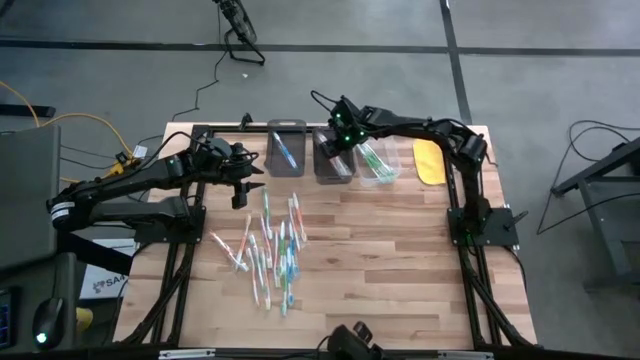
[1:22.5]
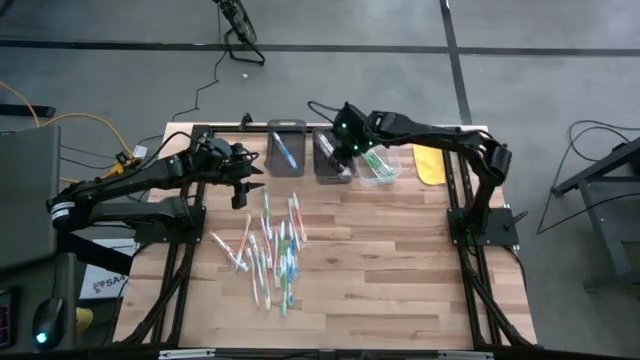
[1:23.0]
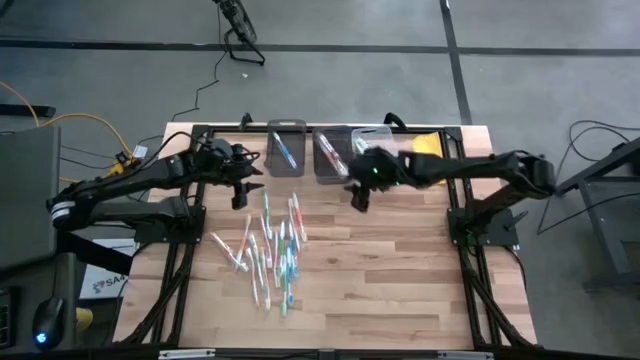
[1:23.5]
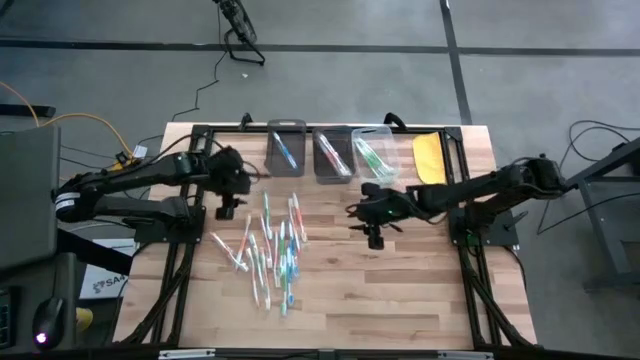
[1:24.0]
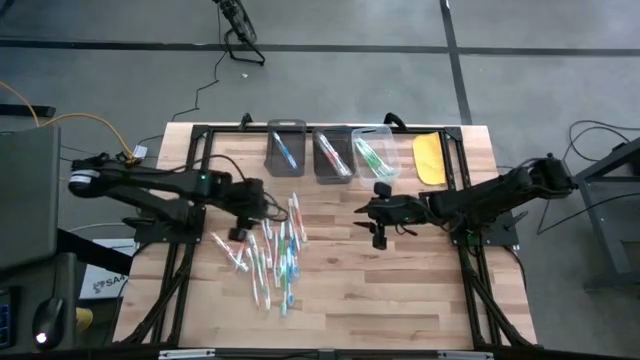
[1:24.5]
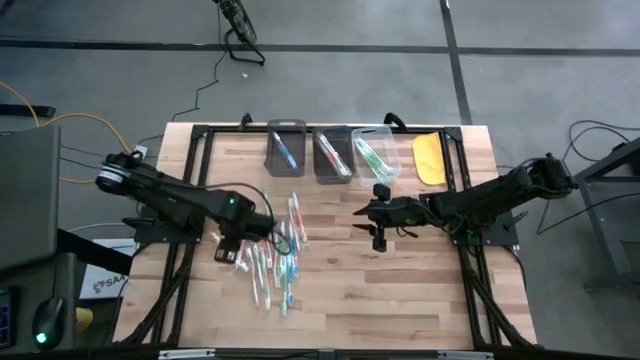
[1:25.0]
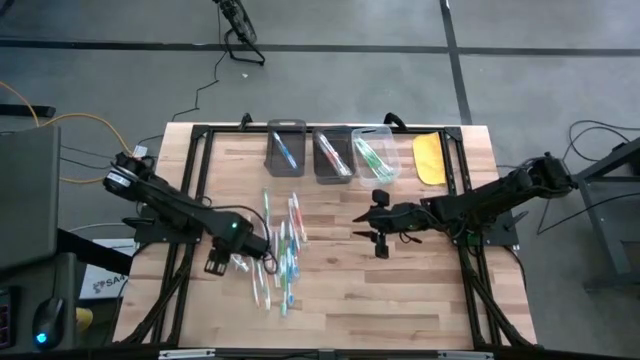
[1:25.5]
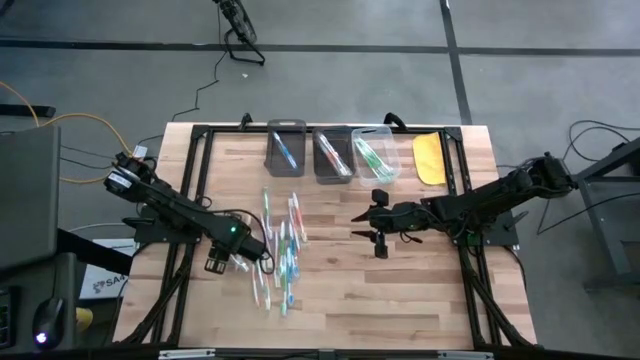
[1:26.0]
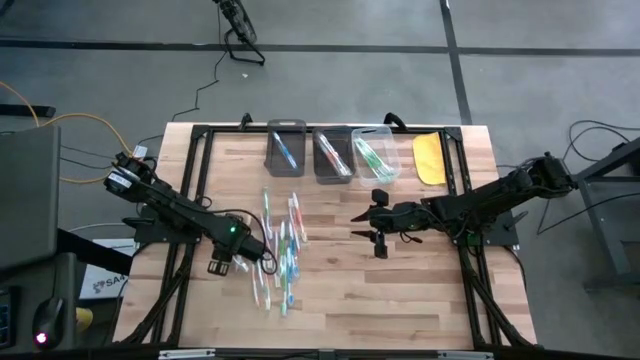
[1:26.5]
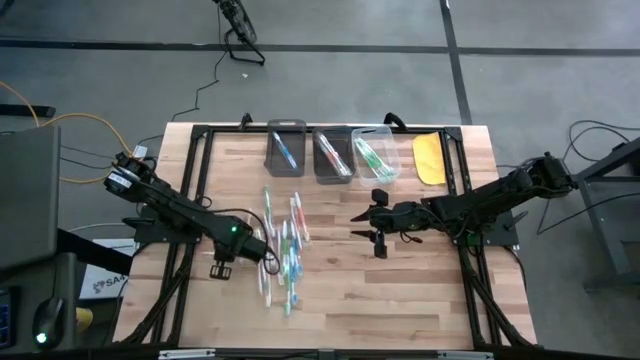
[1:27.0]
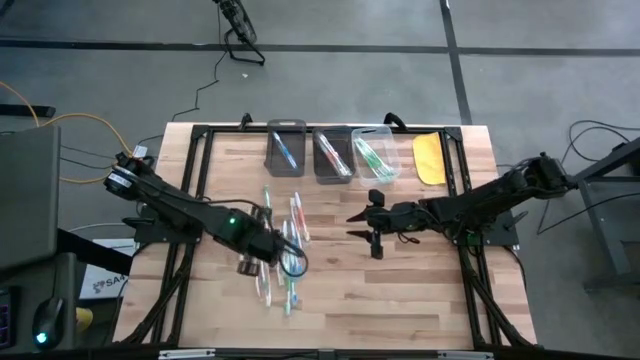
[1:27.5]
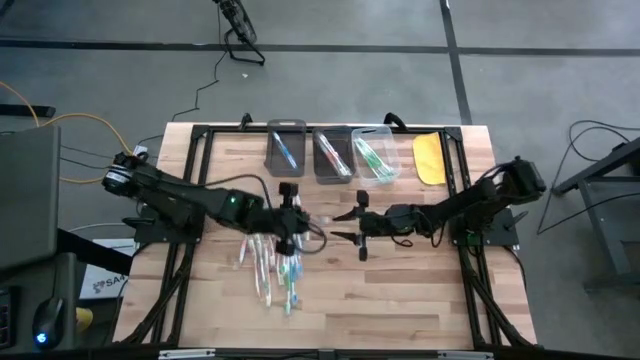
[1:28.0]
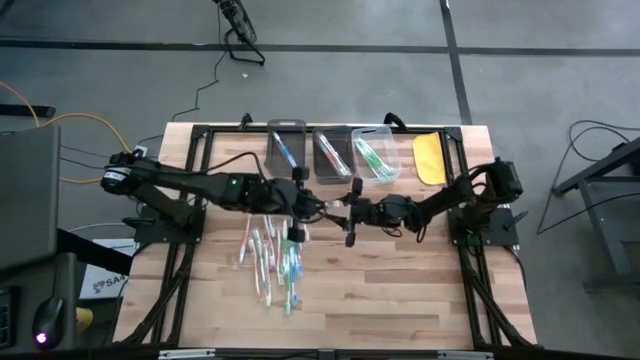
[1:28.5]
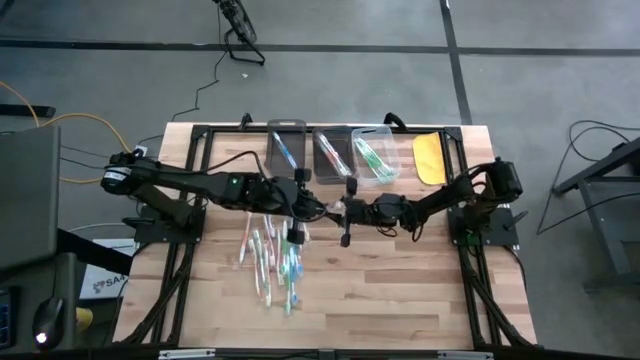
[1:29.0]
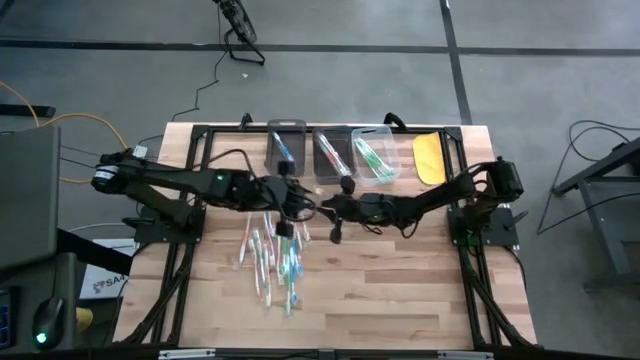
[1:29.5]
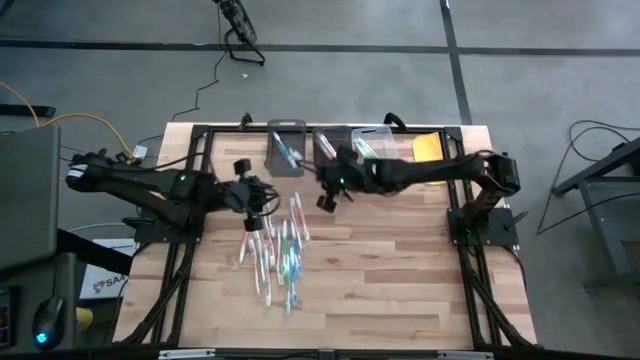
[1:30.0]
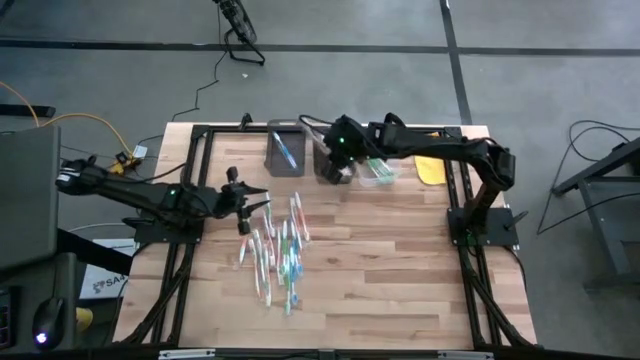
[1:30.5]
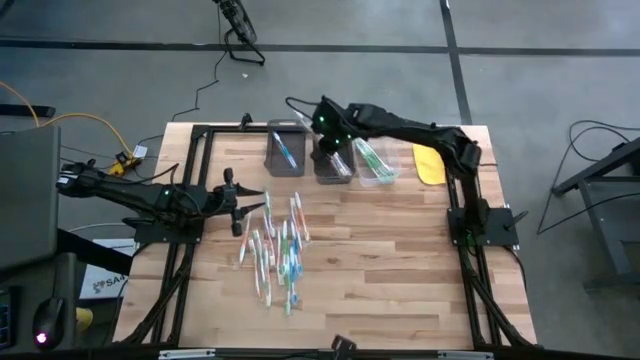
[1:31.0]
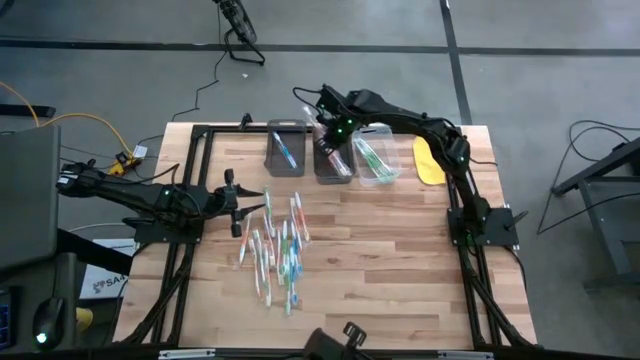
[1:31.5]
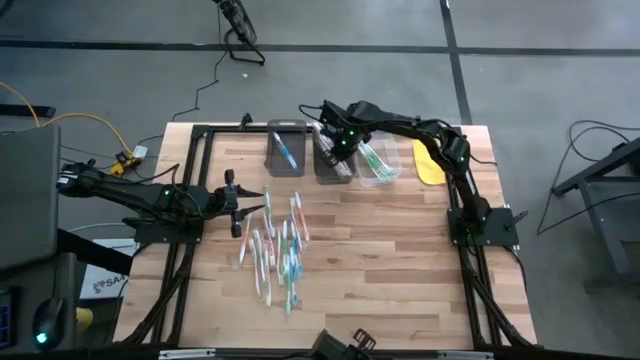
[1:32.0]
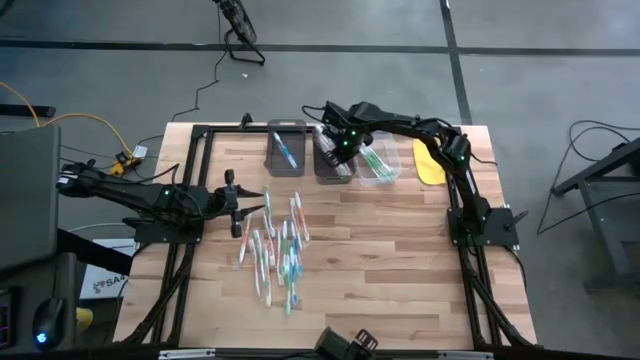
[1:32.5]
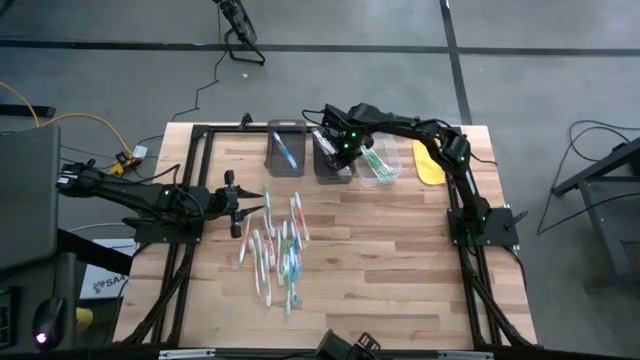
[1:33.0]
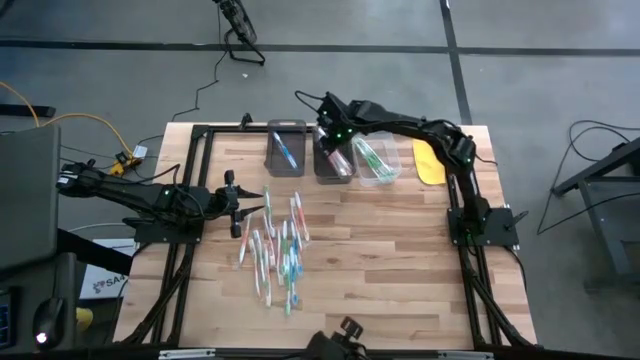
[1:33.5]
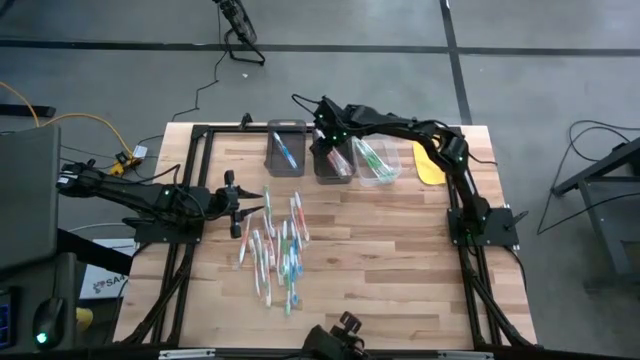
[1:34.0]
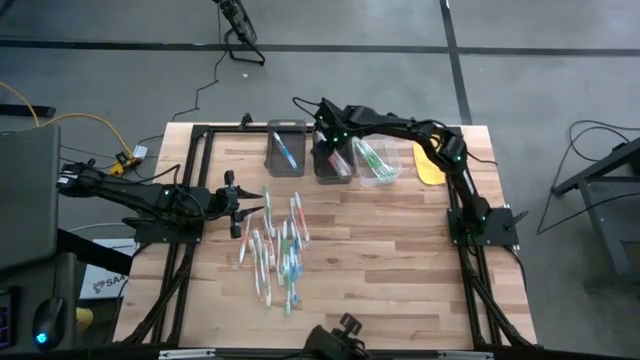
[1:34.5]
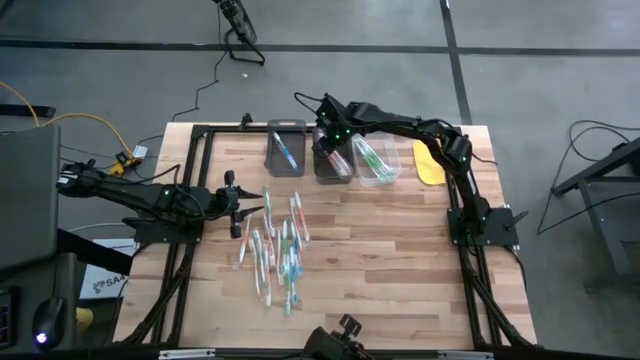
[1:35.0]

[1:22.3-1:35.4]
Task: Pick & Place Toothbrushes
Put the orange toothbrush into the right black bin

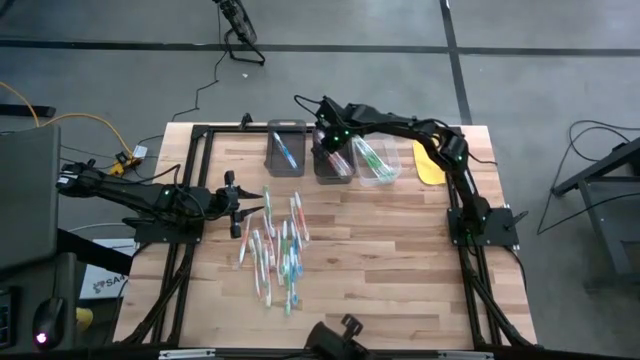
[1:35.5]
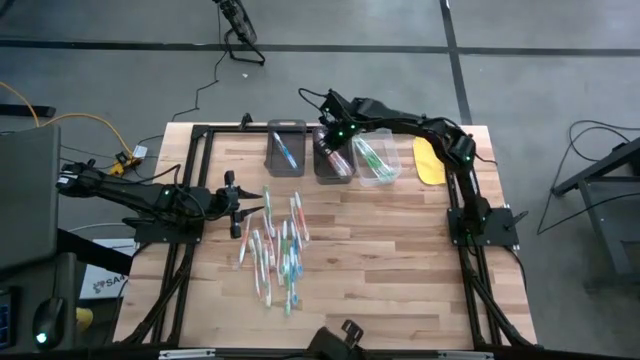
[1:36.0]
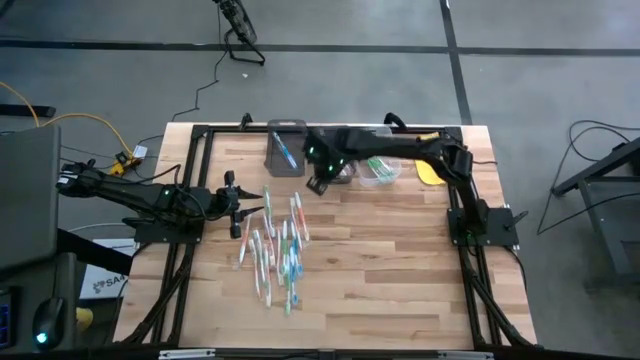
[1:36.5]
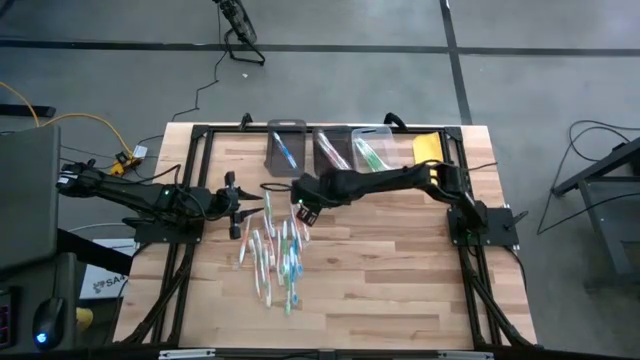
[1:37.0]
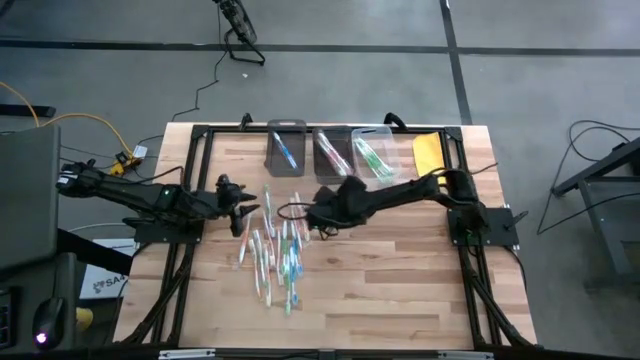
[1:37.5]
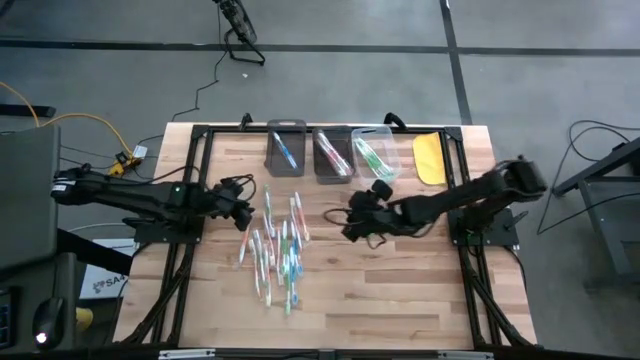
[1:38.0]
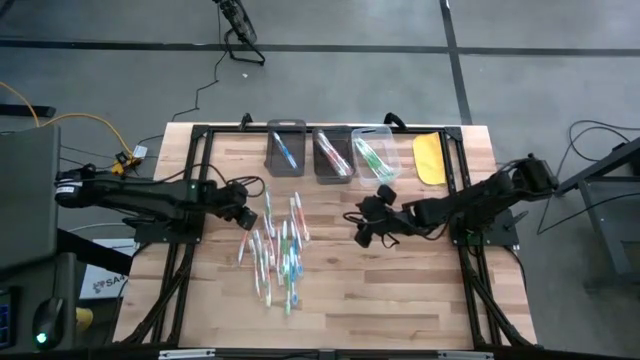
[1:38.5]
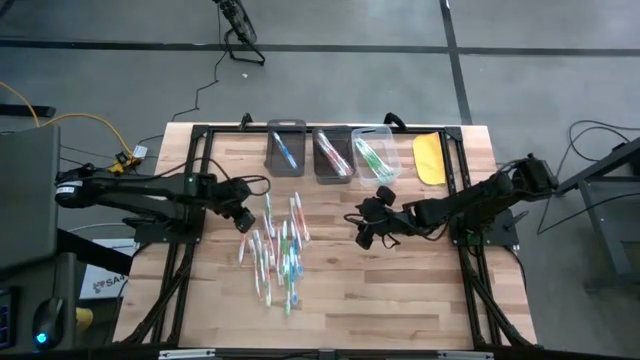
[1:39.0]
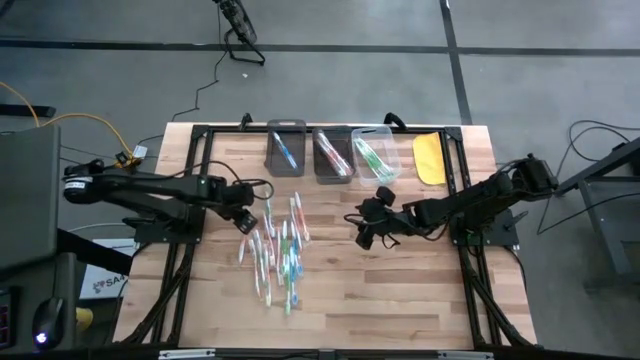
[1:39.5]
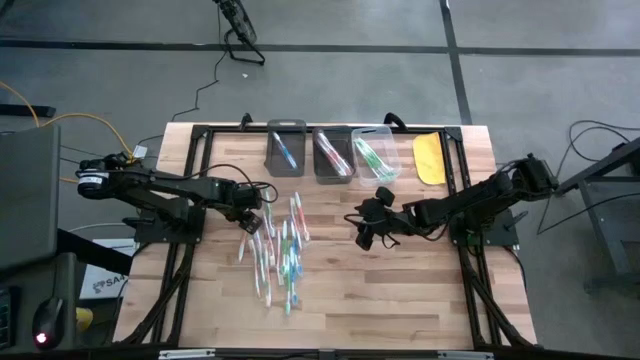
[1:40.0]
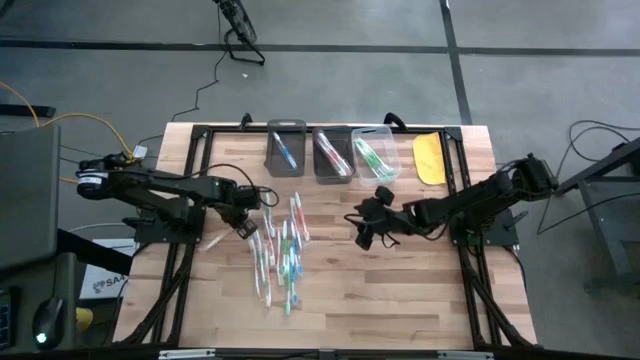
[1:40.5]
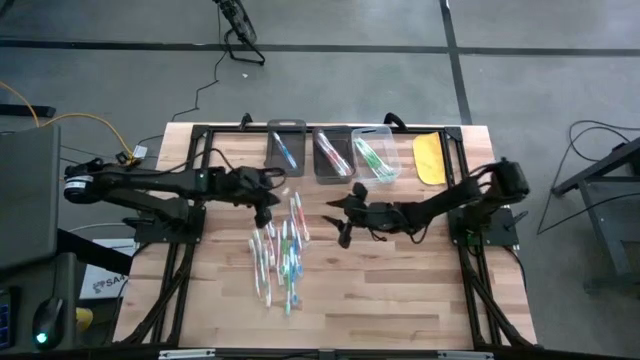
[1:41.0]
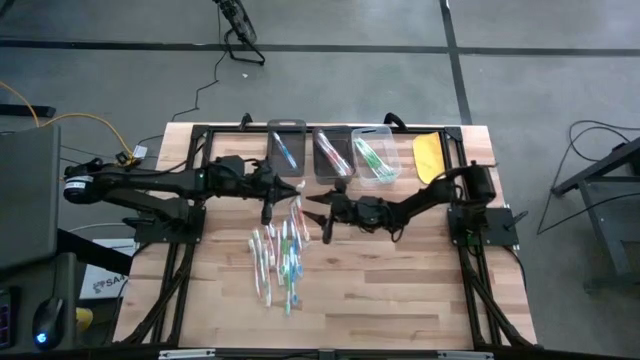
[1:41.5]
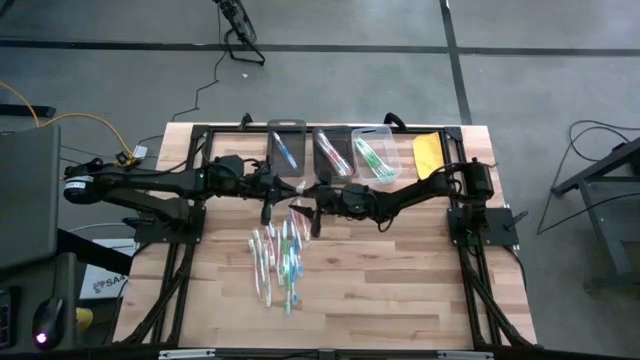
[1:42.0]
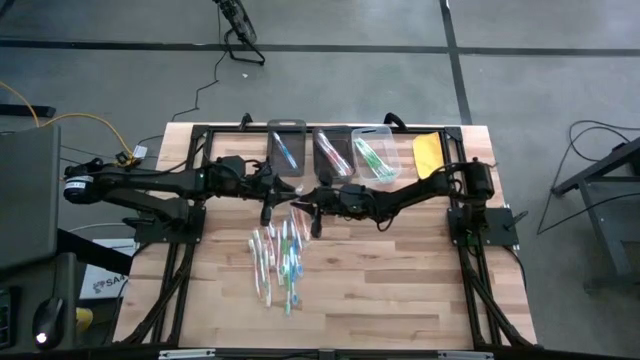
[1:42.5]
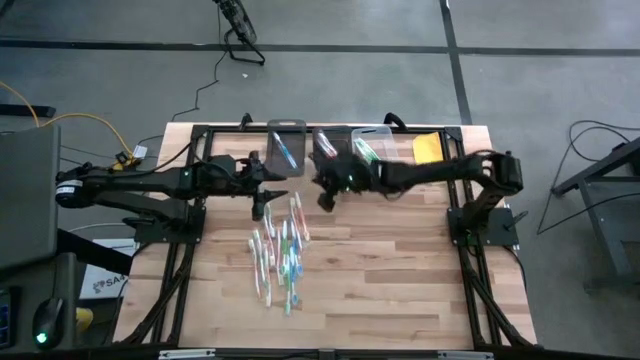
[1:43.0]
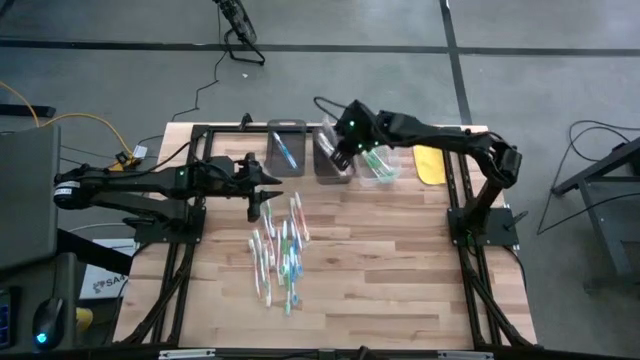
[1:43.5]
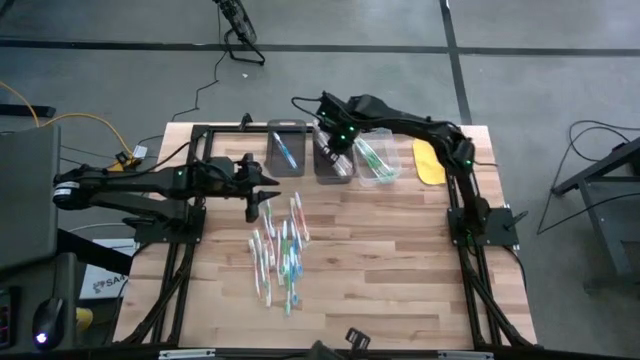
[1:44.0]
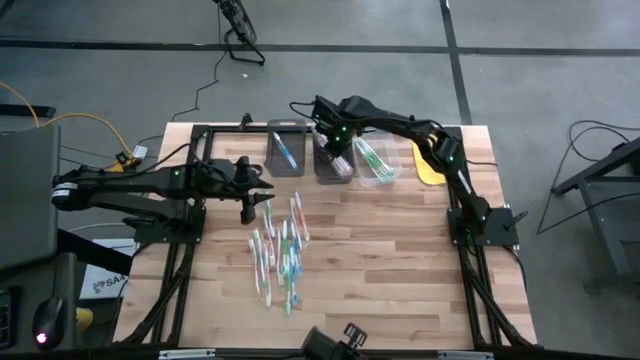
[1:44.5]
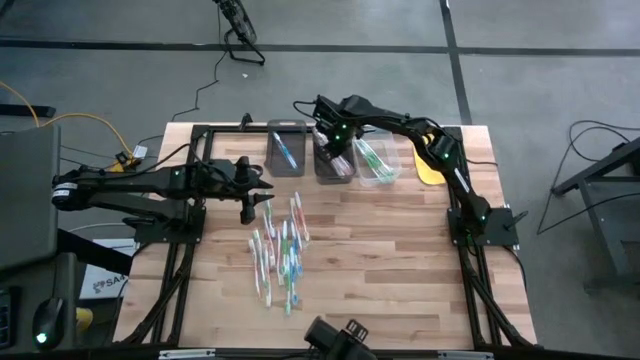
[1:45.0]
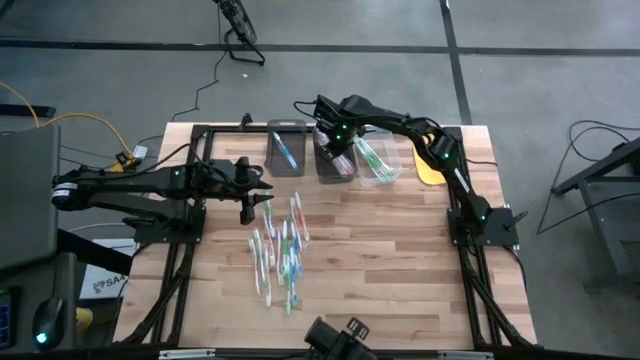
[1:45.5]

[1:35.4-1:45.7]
Put the orange toothbrush into the right black bin
